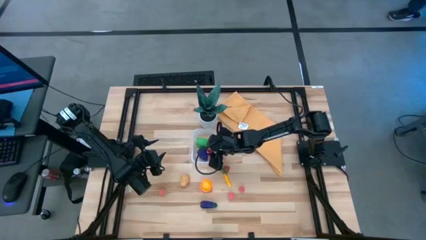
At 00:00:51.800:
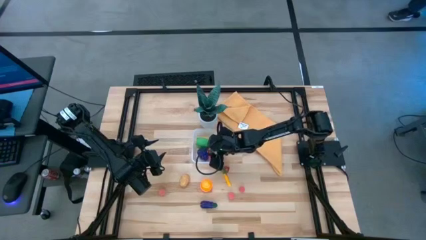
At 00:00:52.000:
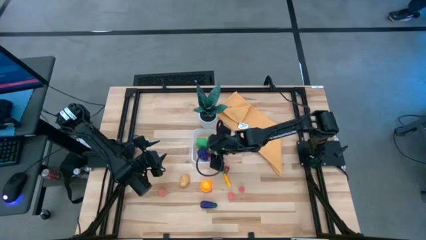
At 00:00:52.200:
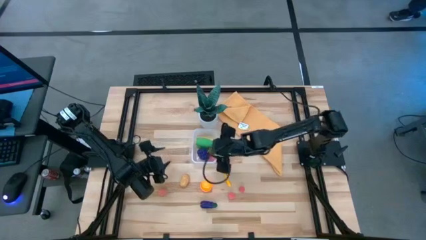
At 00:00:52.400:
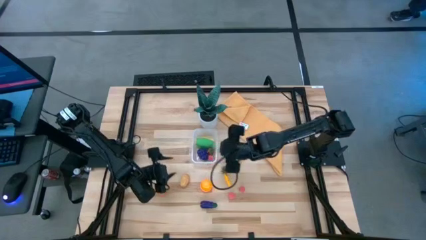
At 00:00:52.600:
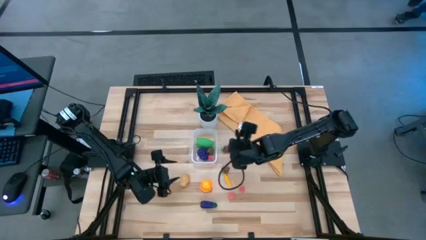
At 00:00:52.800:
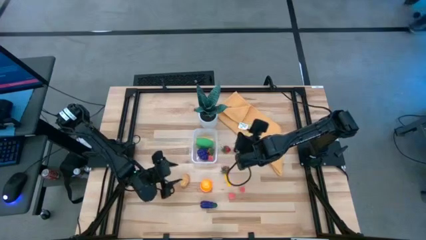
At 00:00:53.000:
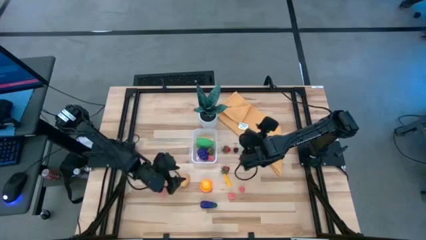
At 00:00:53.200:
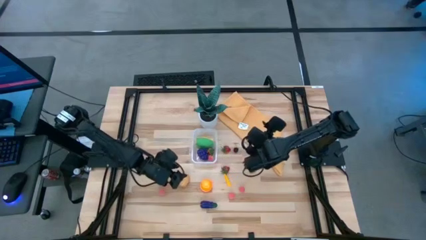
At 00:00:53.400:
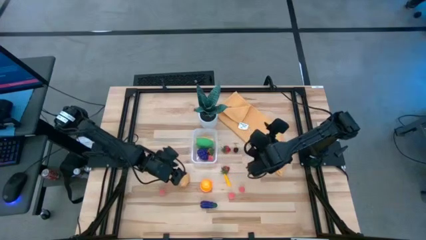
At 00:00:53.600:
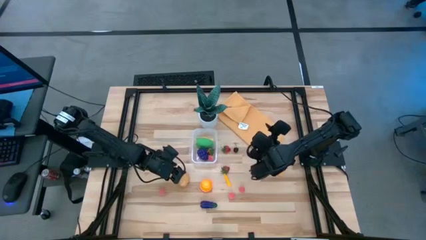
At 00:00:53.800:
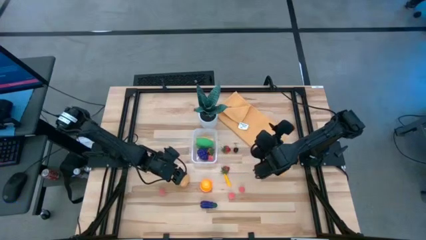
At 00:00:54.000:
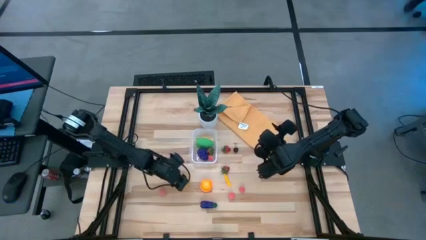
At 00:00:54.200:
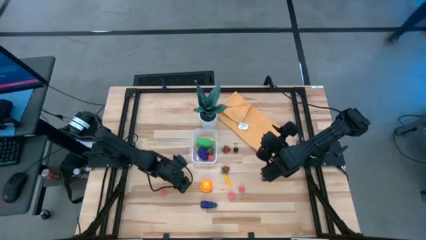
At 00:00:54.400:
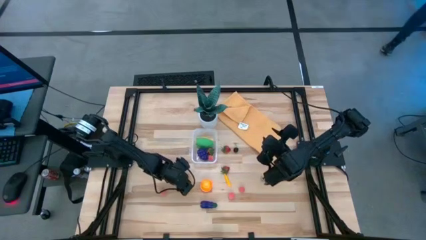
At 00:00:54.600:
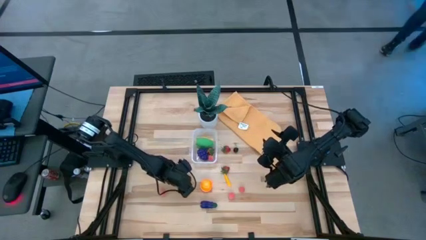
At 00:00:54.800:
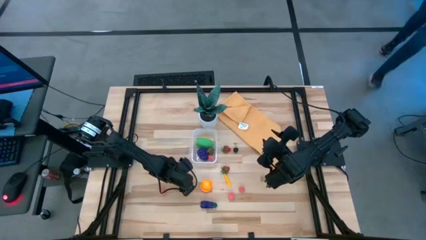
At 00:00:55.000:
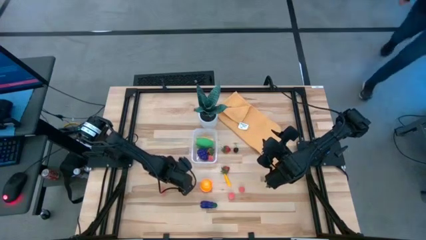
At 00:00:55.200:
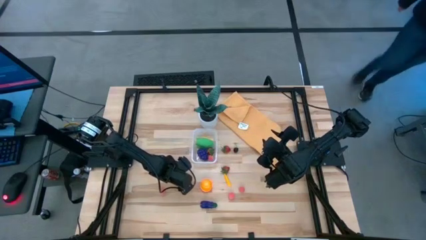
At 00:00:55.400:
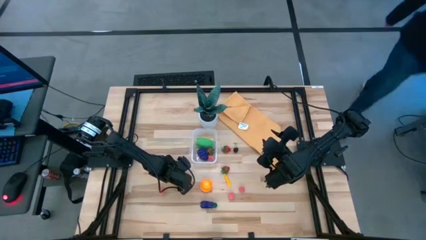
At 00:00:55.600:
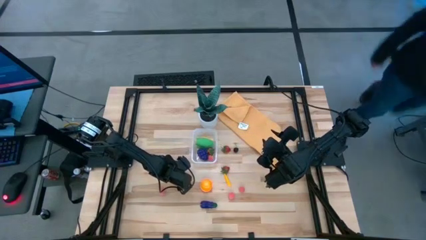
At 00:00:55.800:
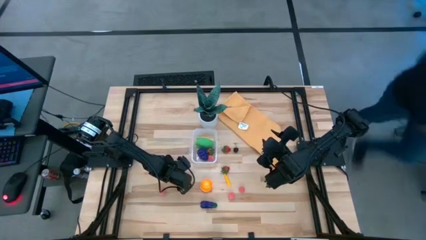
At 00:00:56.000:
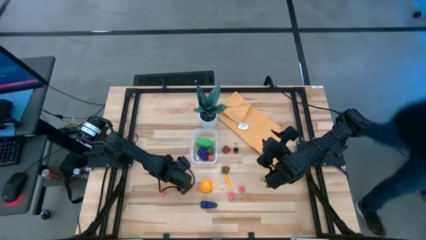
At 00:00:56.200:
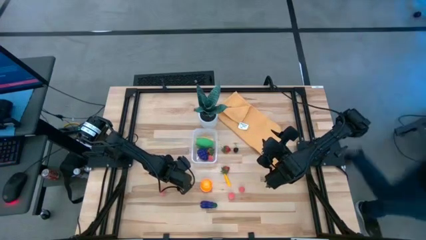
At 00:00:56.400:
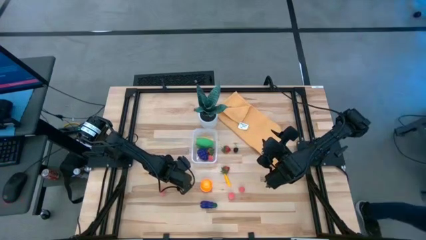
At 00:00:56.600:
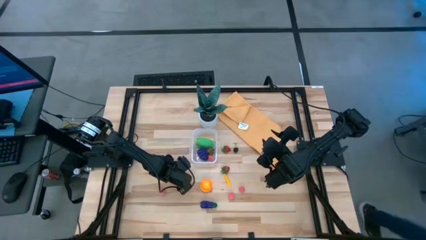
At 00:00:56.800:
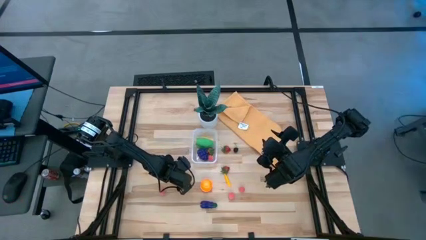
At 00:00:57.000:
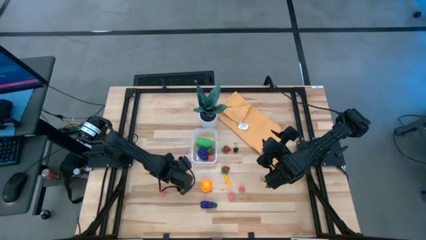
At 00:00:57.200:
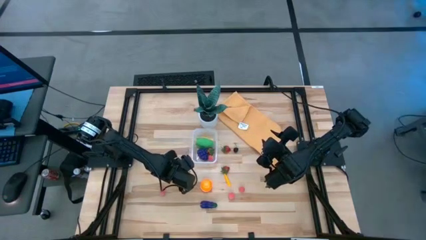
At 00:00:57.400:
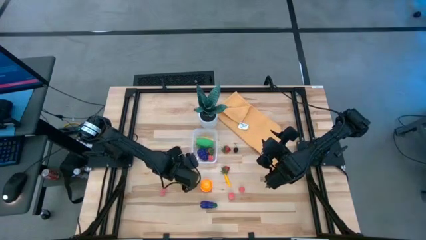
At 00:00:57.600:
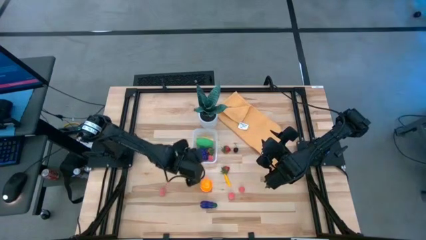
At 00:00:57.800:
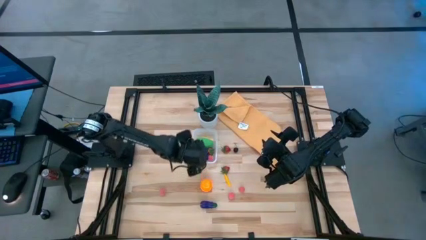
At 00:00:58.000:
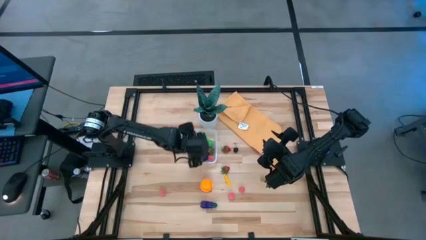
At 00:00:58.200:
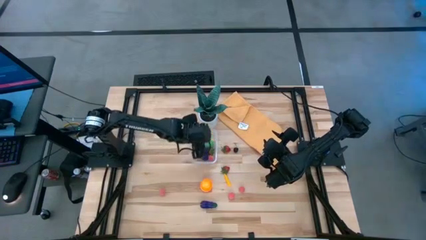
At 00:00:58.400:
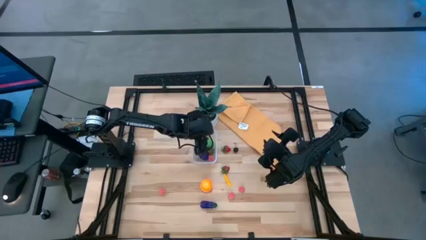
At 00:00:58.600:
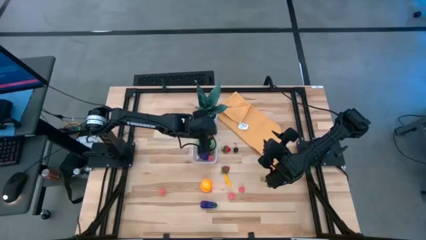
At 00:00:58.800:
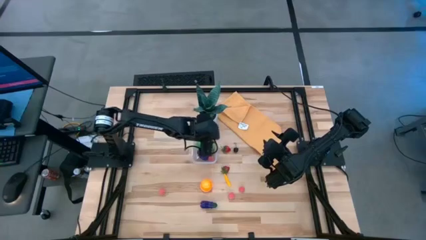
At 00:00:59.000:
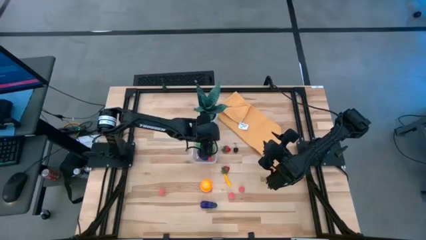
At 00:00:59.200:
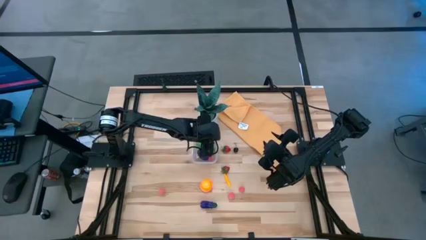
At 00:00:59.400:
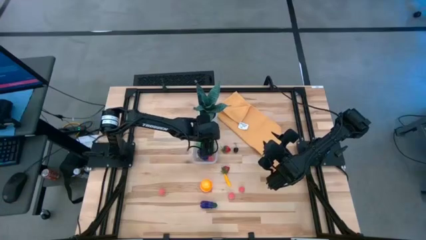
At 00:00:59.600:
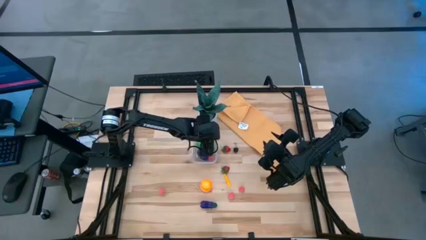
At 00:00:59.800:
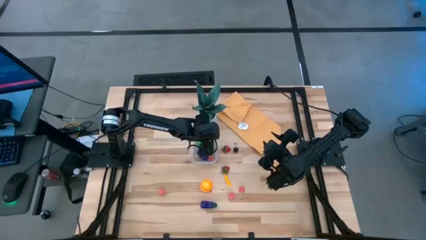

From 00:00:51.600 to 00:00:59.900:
Task: Pick and placing Produce into tupperware
Put the potato into the transparent bin

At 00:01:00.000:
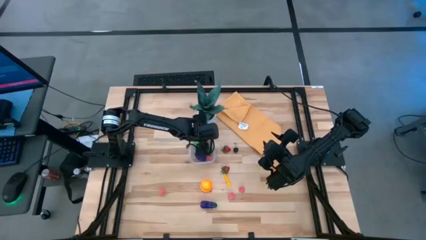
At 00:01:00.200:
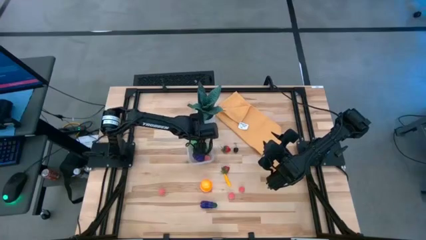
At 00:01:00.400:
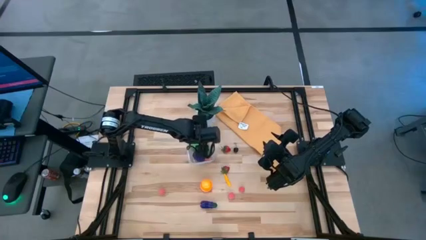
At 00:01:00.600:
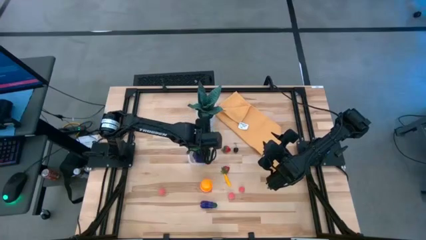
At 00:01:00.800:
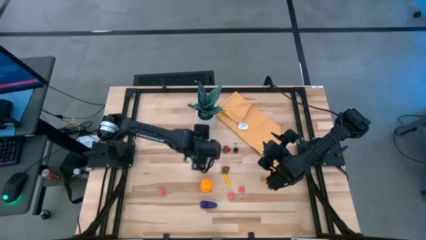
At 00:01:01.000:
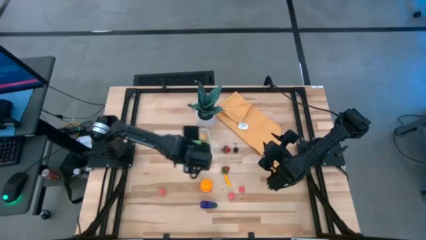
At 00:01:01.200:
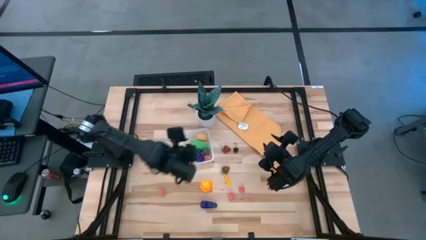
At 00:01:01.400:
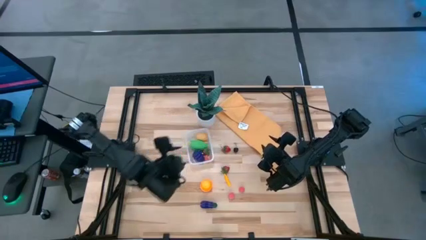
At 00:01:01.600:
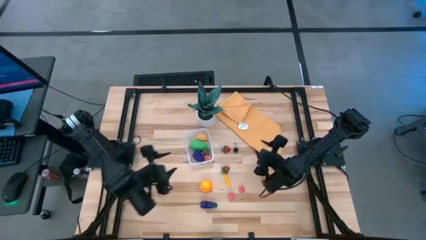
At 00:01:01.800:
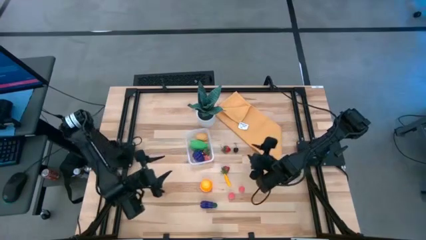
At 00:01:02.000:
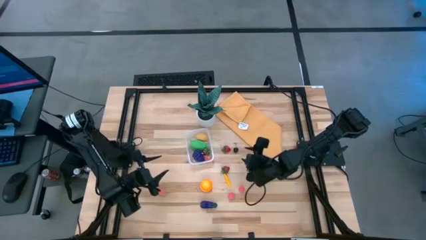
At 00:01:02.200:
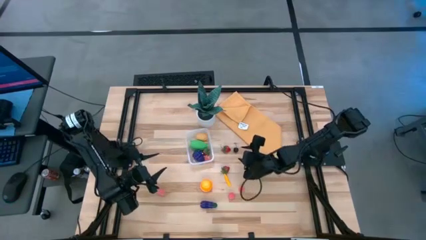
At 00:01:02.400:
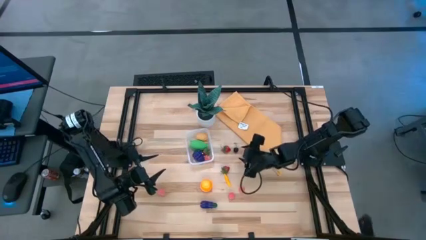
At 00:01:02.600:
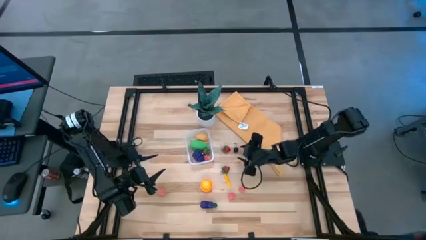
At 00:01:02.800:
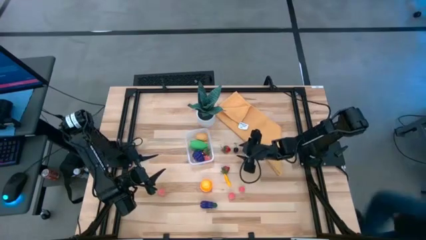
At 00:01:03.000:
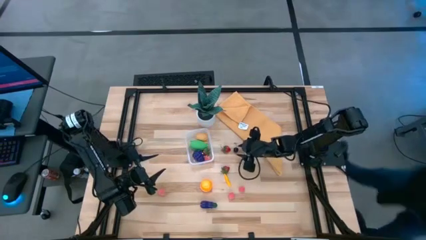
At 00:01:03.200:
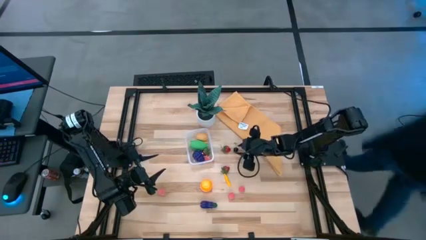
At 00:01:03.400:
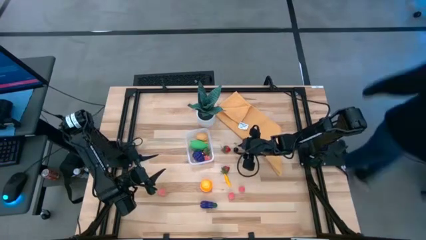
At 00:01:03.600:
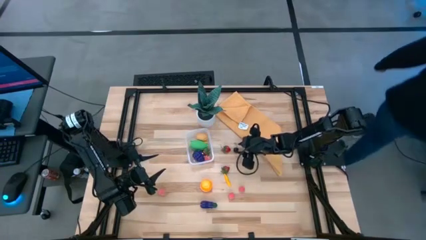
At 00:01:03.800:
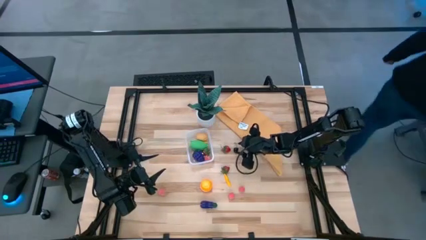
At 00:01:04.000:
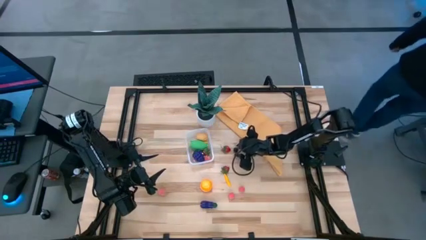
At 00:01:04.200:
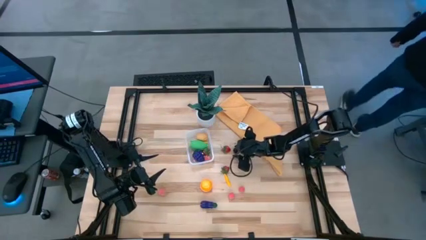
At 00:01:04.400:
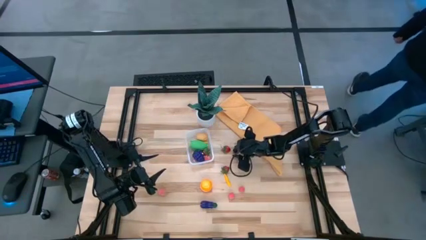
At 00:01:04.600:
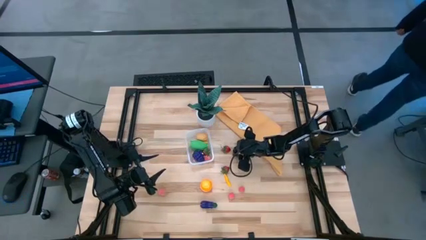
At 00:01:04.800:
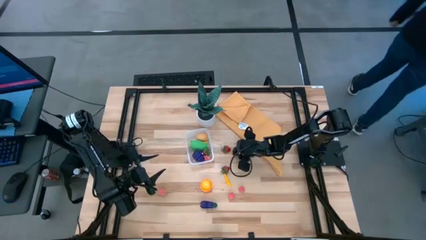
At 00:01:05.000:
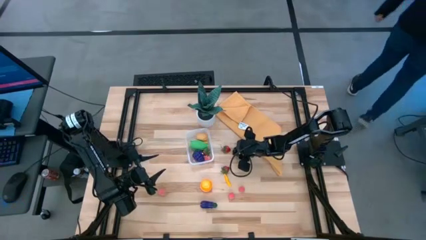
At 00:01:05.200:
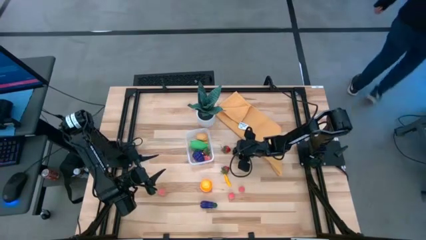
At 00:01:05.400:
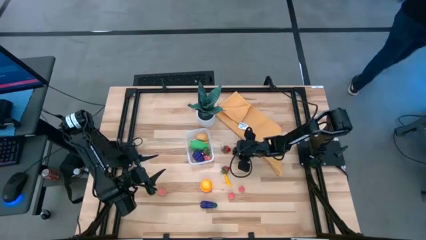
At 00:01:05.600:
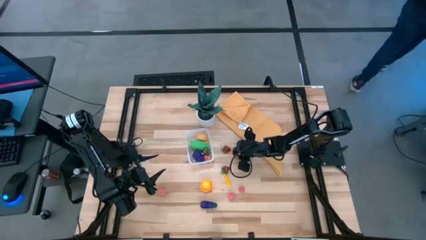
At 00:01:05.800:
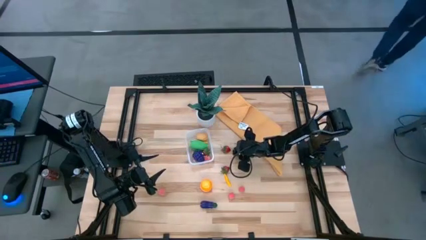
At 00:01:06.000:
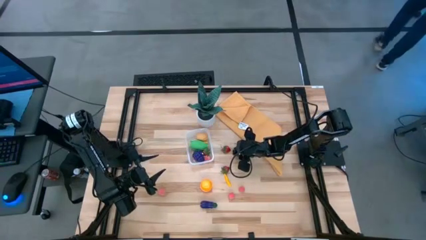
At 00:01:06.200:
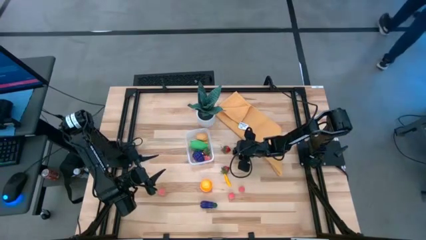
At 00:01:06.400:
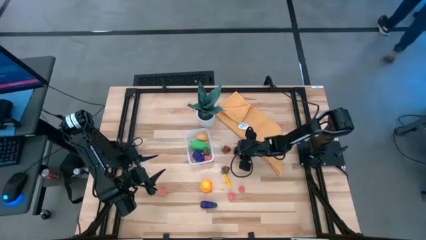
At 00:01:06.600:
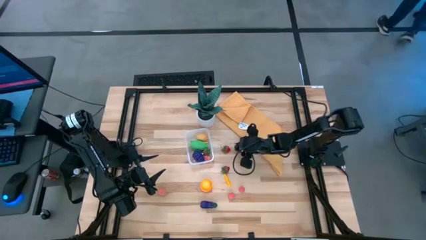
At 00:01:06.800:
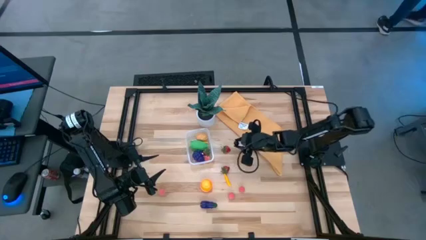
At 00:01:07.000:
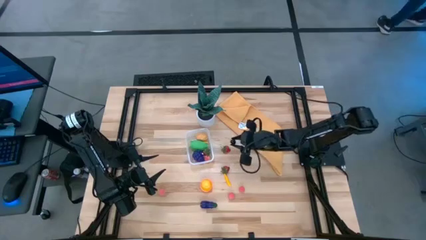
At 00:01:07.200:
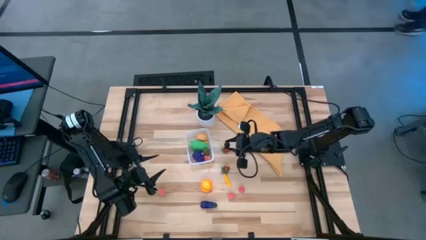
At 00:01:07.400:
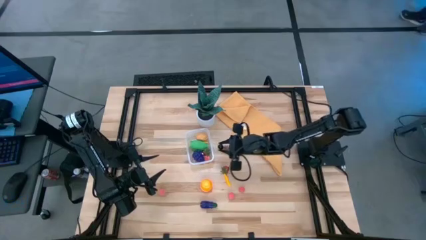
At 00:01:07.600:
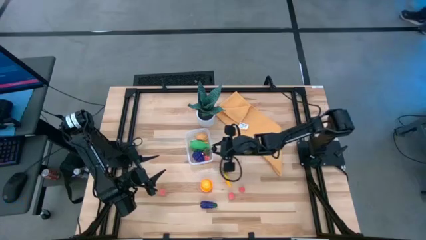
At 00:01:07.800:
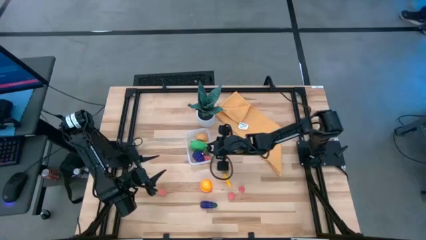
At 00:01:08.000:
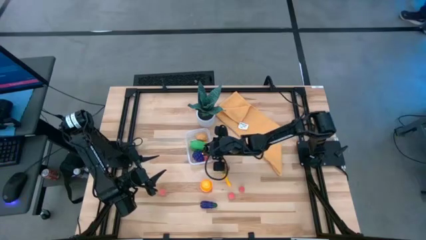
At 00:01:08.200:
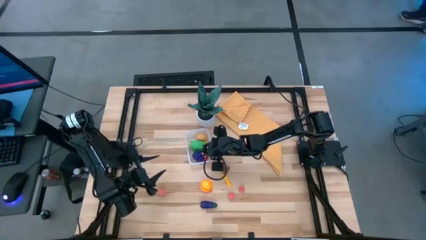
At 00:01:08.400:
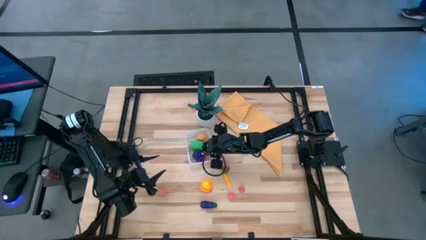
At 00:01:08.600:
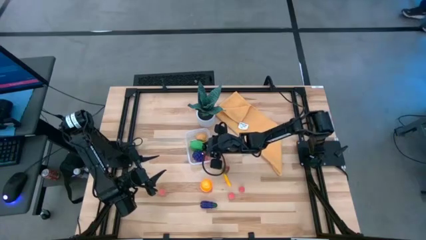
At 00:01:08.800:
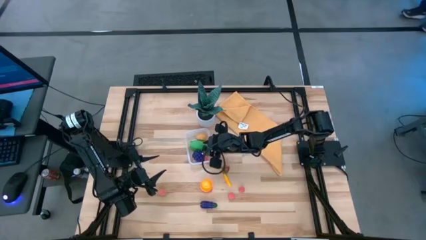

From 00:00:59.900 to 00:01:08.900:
Put the cherry into the transparent bin
